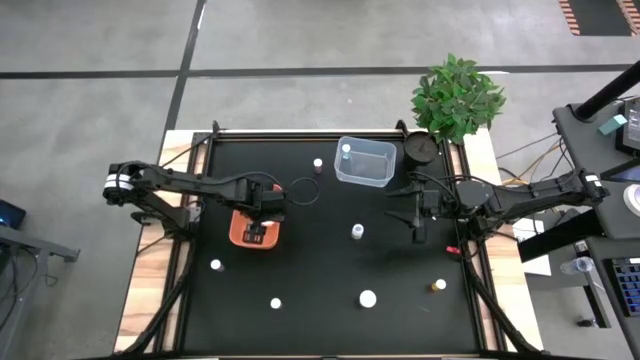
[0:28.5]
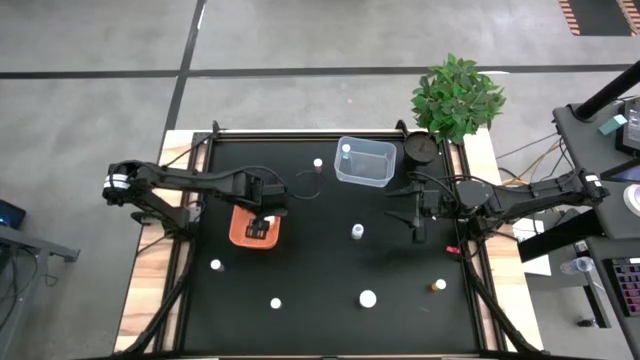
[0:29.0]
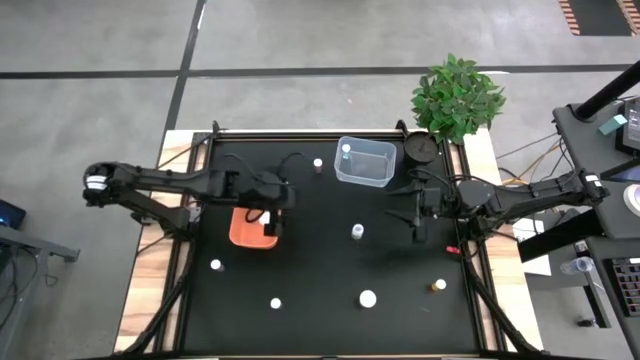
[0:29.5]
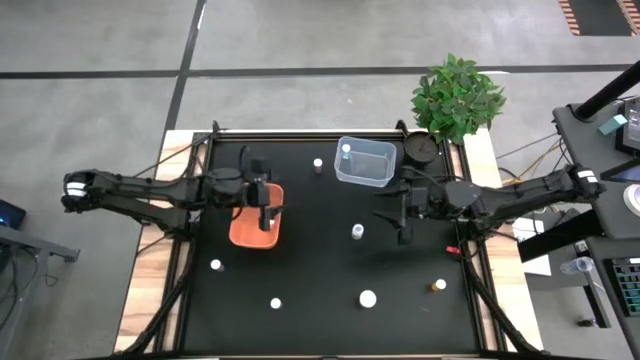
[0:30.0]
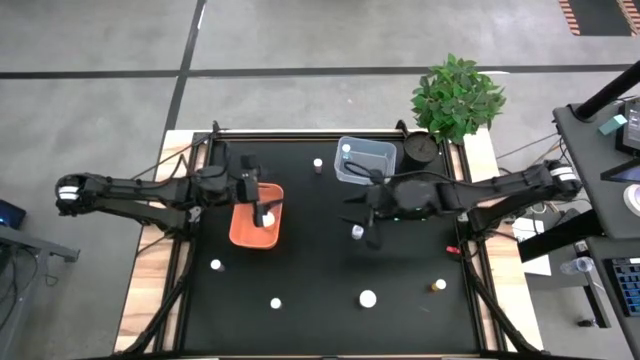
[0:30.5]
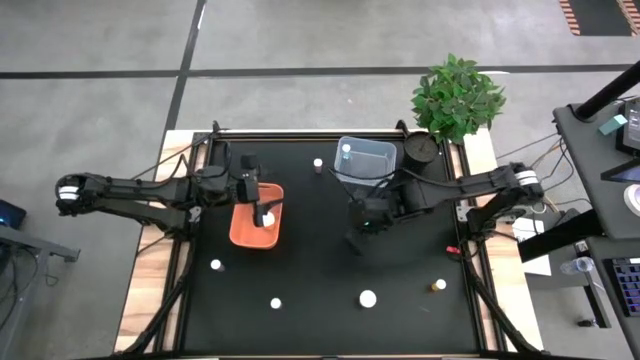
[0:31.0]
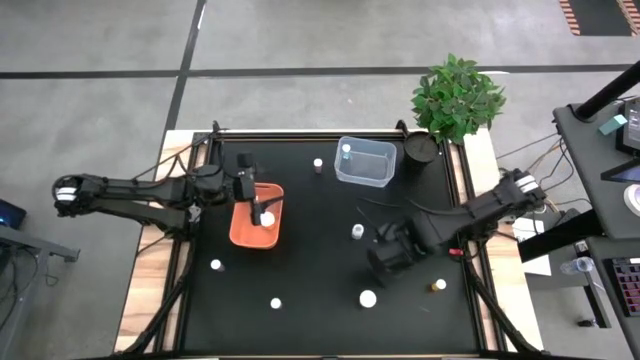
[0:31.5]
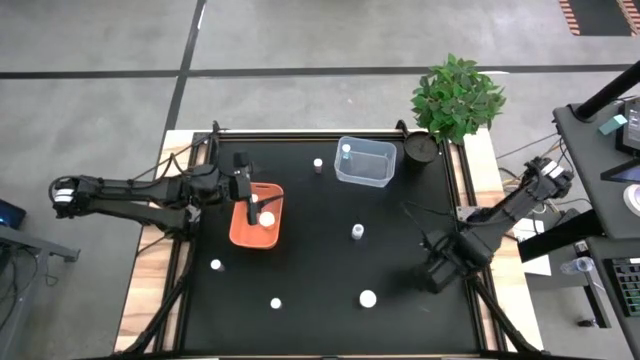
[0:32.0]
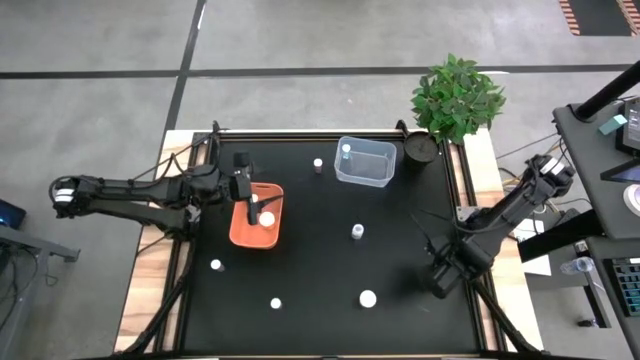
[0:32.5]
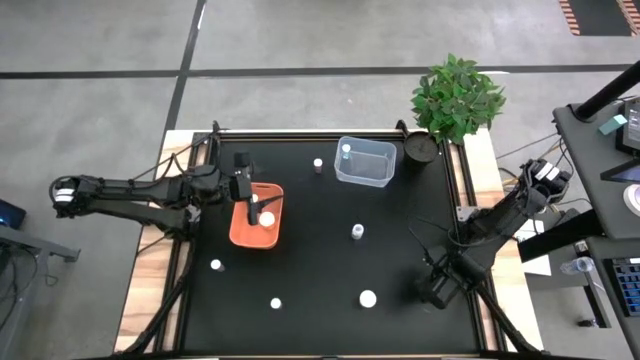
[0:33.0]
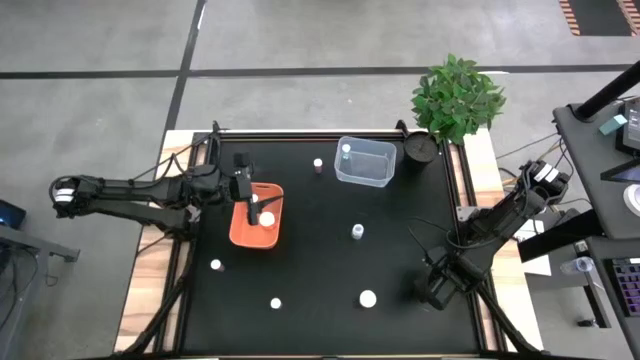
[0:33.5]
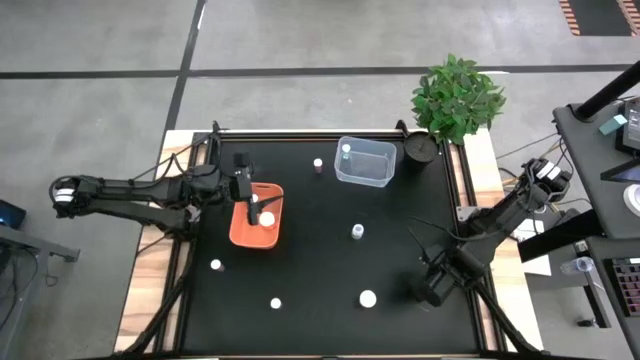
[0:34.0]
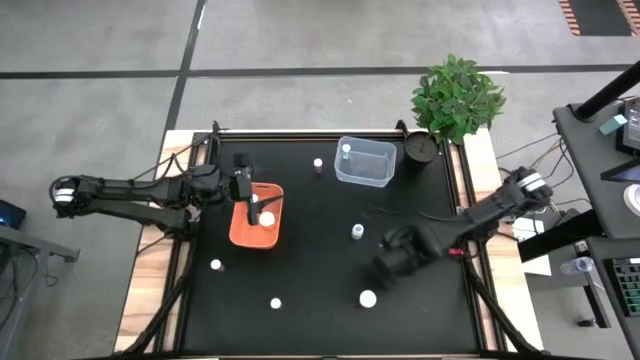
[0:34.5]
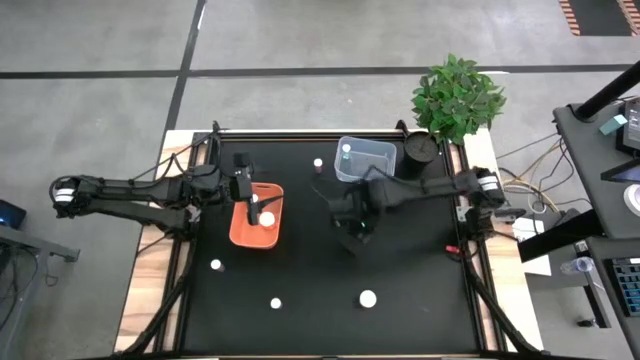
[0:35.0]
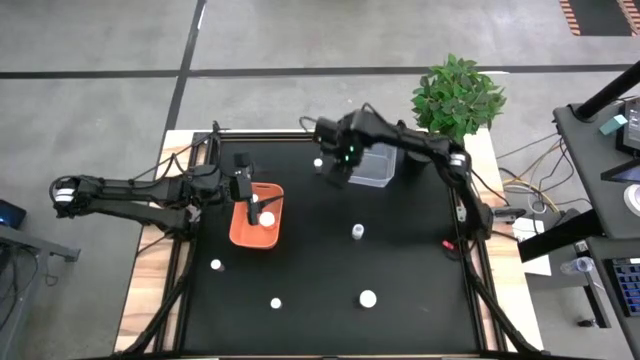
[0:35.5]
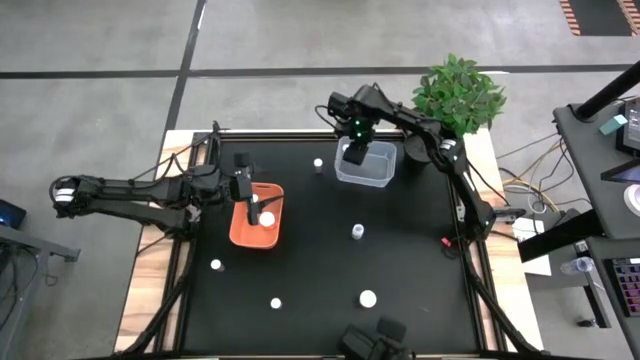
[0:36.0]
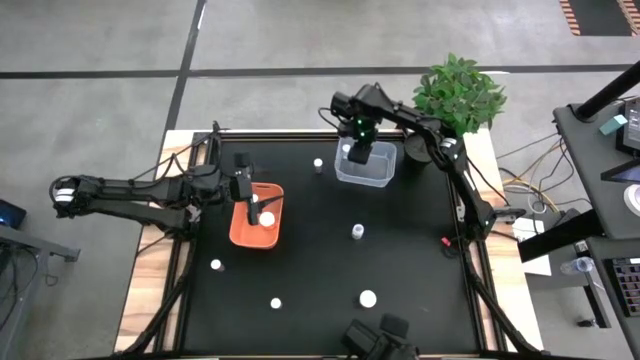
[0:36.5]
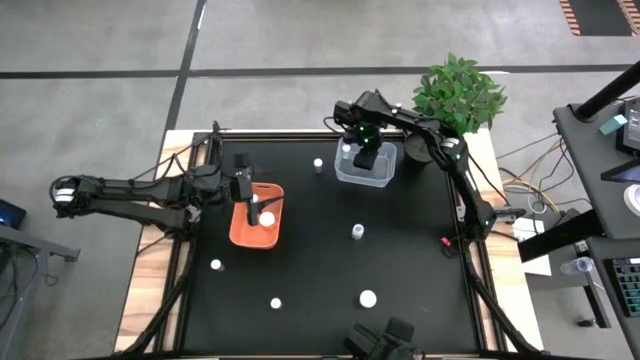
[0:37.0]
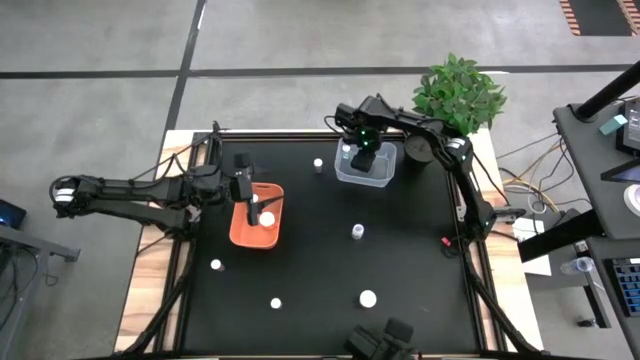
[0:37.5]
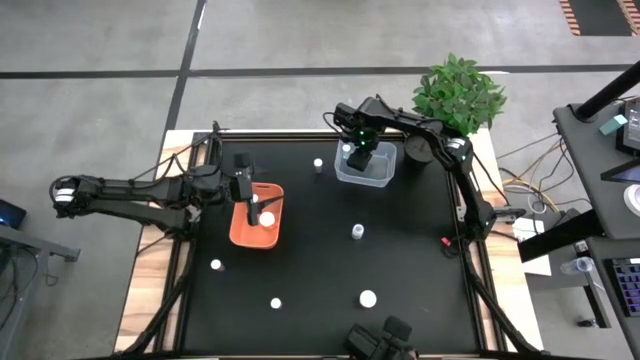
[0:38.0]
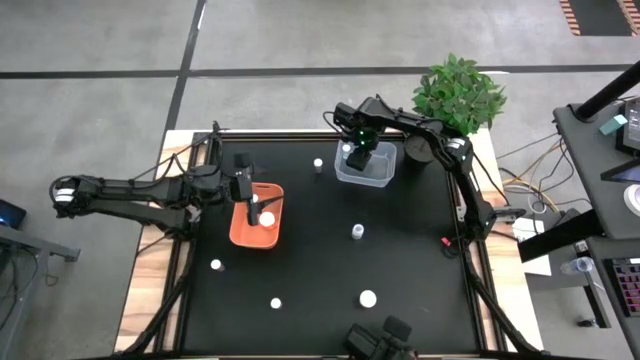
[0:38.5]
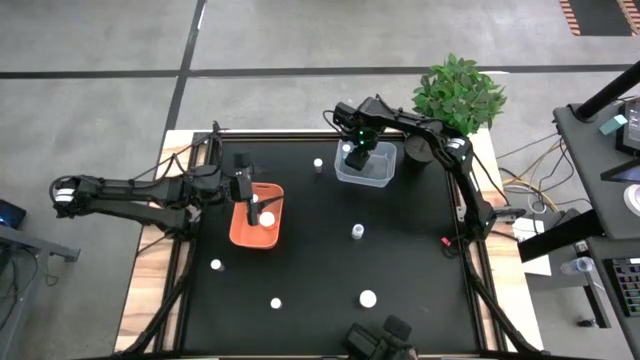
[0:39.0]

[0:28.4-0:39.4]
Task: Pick and place medicine bottles into bin by pill shape (circle, oval)
Put the small orange tablet pill bottle into the transparent bin

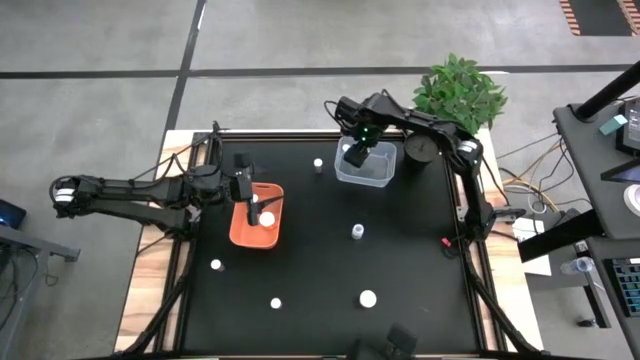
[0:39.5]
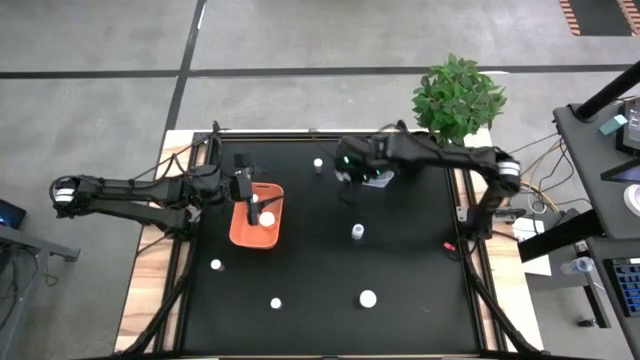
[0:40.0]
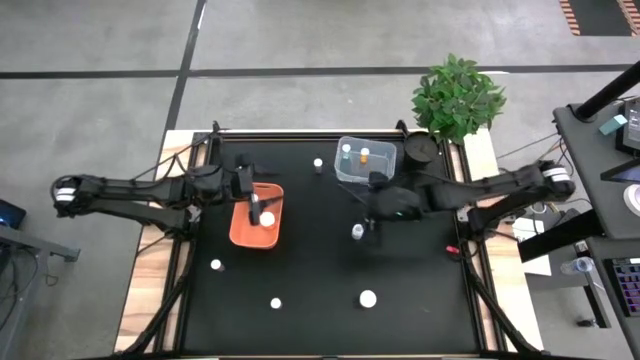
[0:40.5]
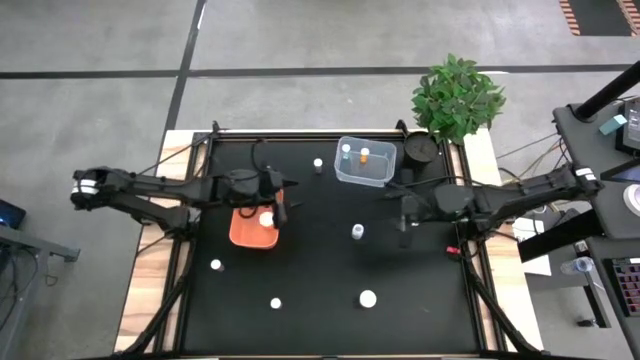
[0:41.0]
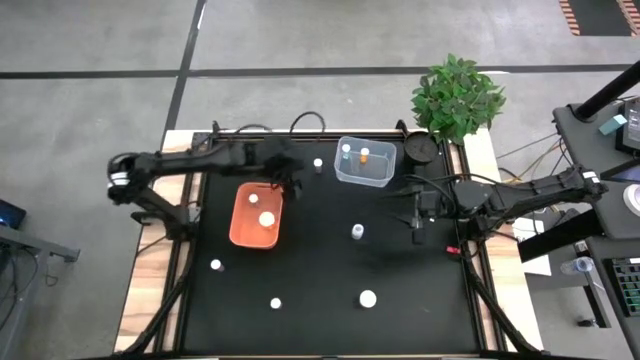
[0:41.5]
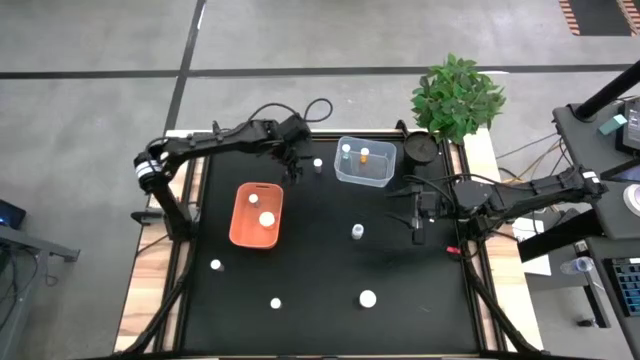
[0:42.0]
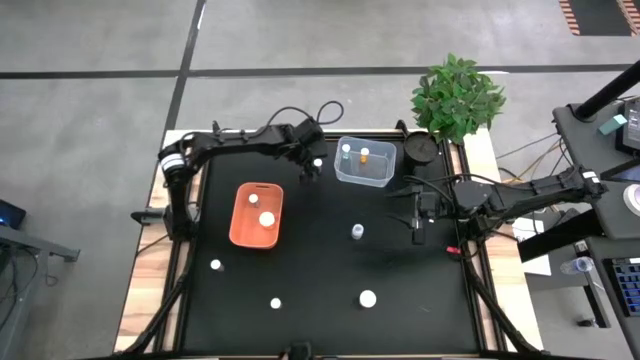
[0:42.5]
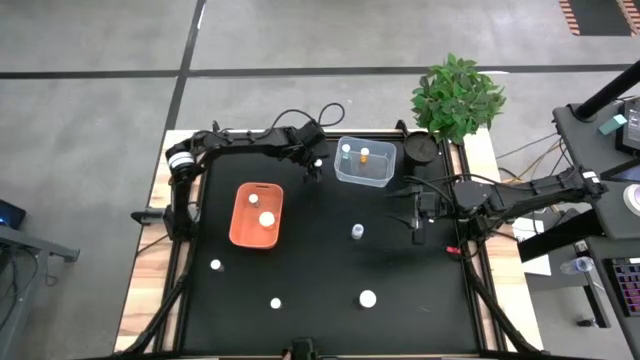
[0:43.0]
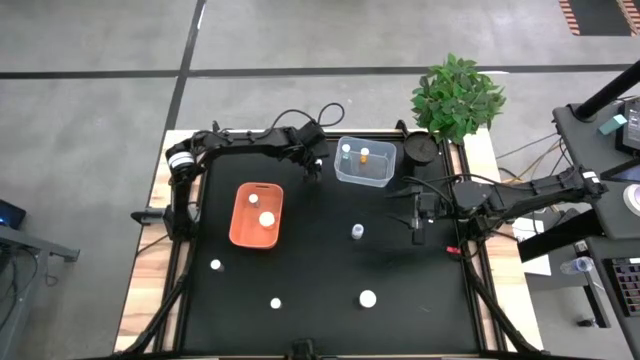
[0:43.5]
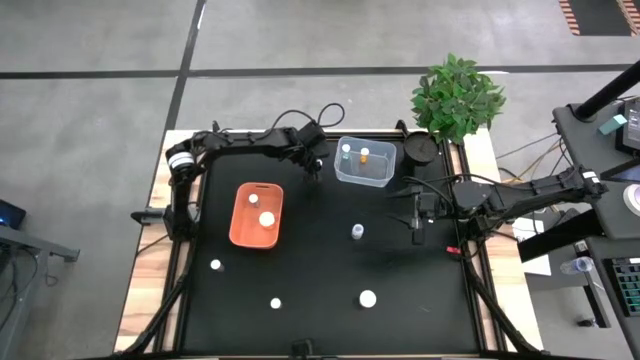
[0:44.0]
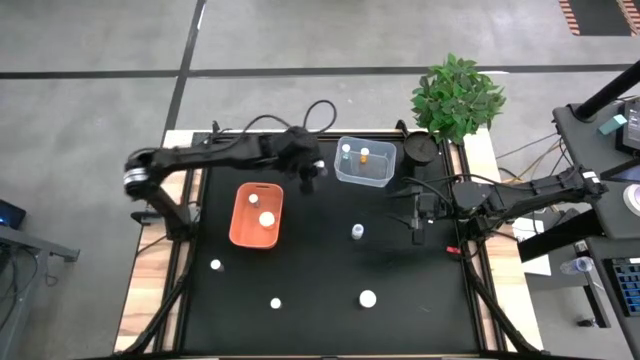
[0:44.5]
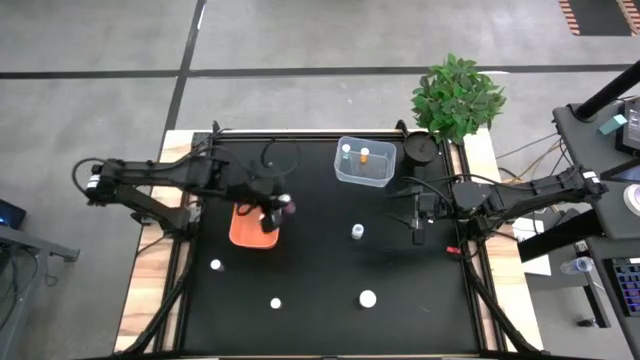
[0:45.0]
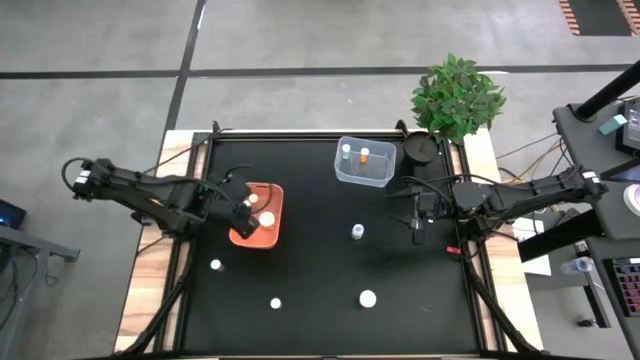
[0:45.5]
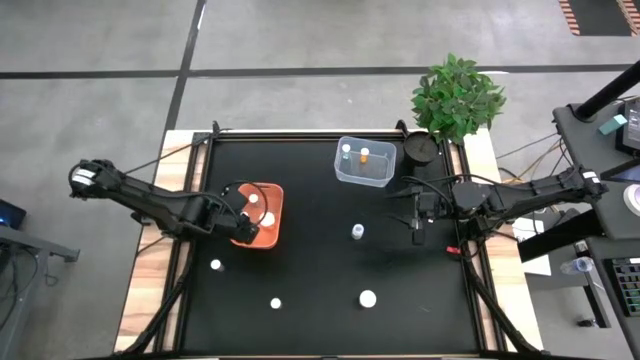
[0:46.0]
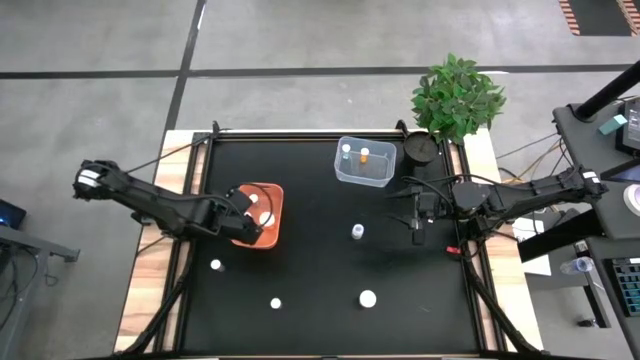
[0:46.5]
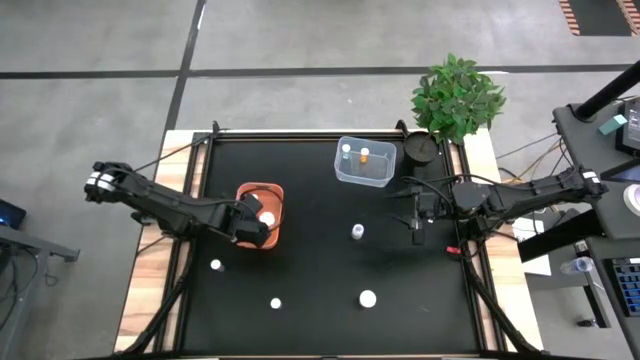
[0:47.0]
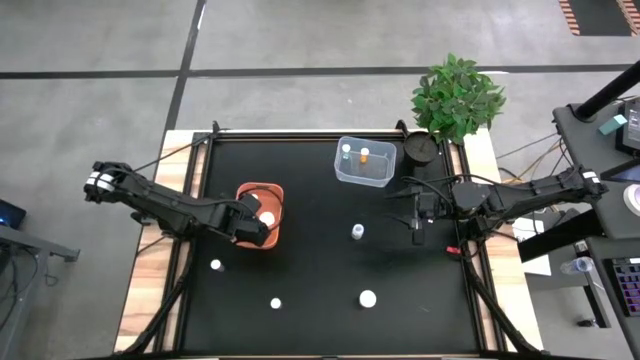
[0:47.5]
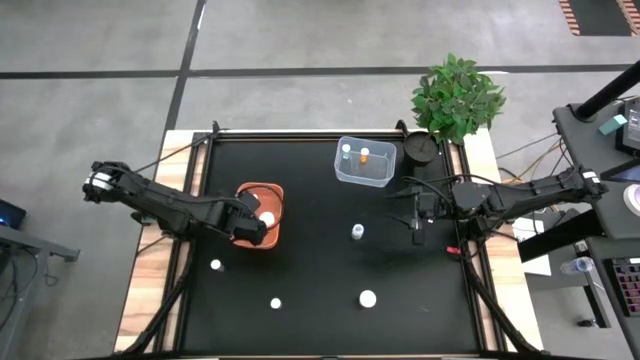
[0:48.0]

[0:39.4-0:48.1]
Put the top blue capsule pill bottle into the orange bin
